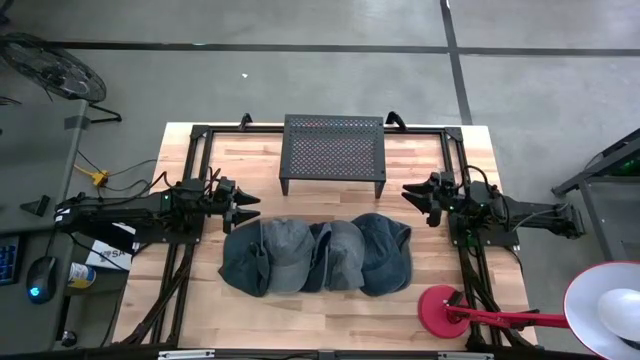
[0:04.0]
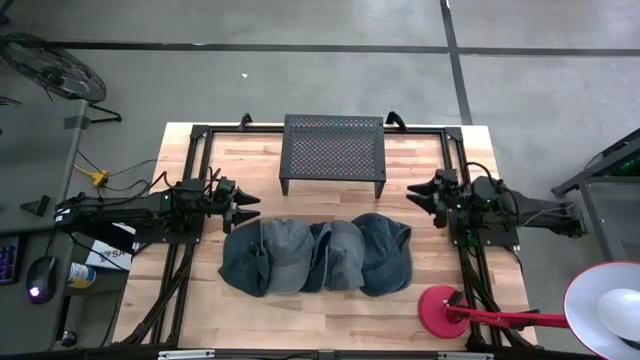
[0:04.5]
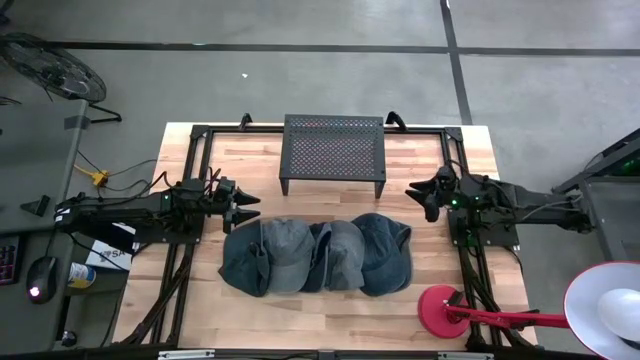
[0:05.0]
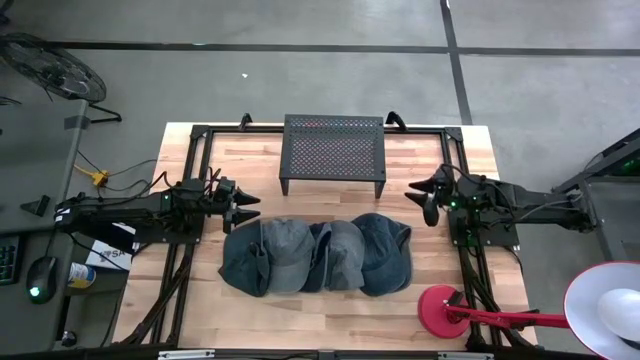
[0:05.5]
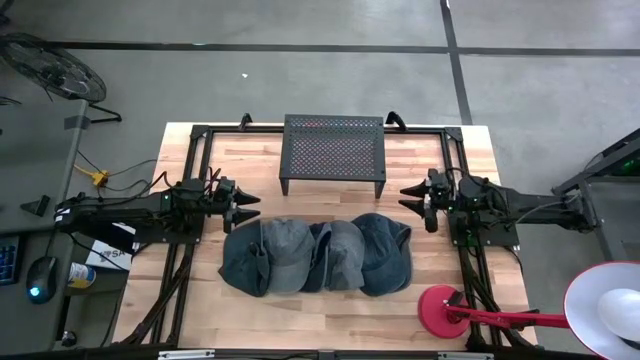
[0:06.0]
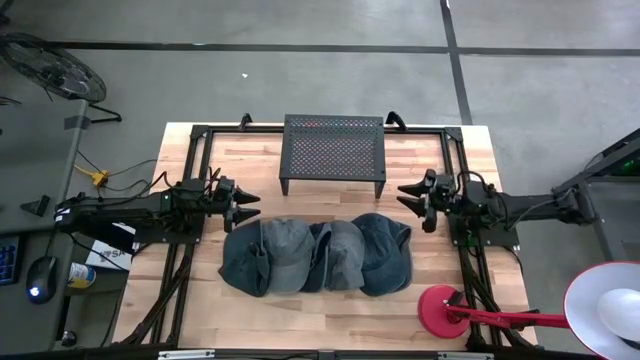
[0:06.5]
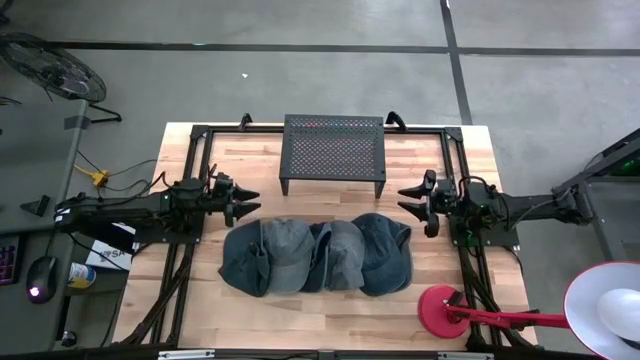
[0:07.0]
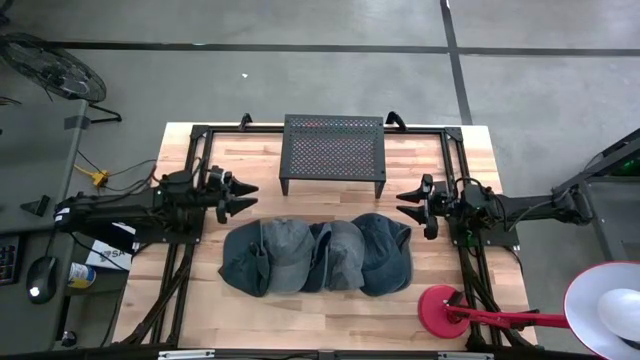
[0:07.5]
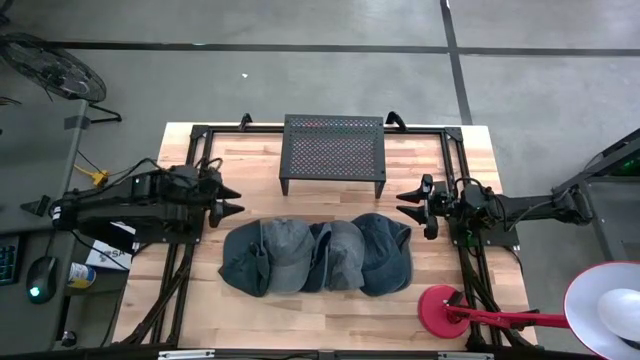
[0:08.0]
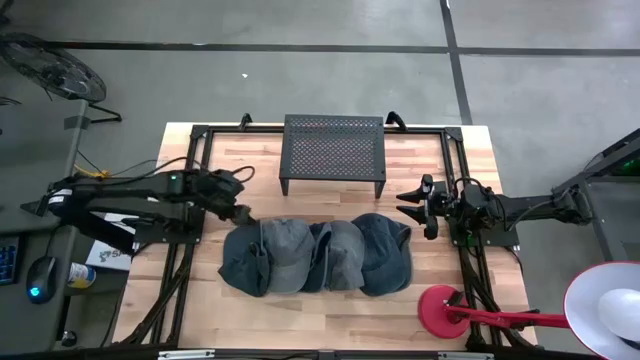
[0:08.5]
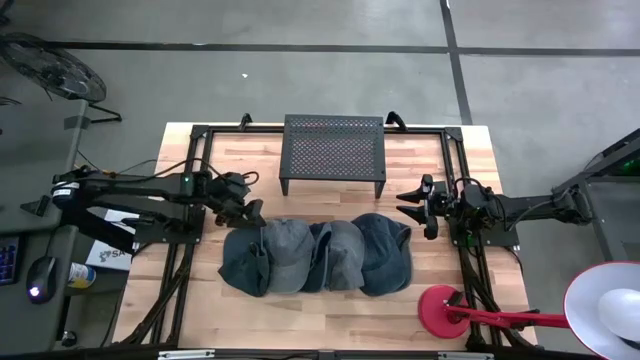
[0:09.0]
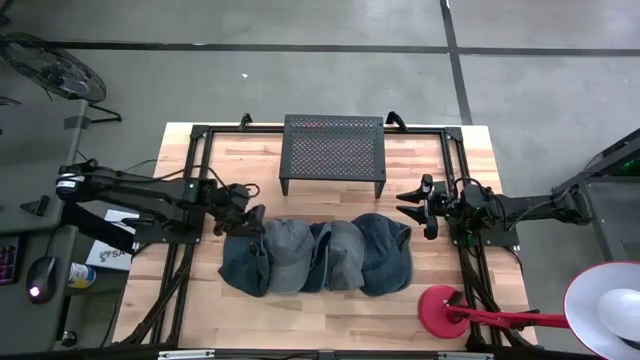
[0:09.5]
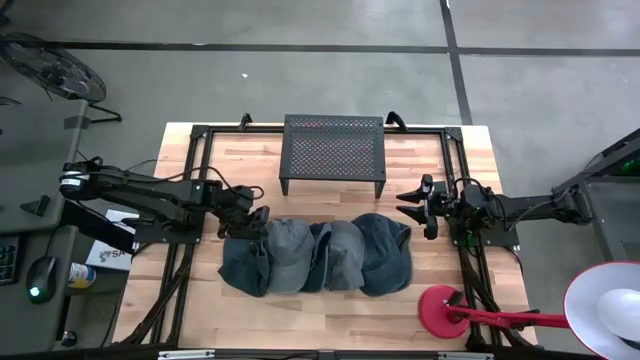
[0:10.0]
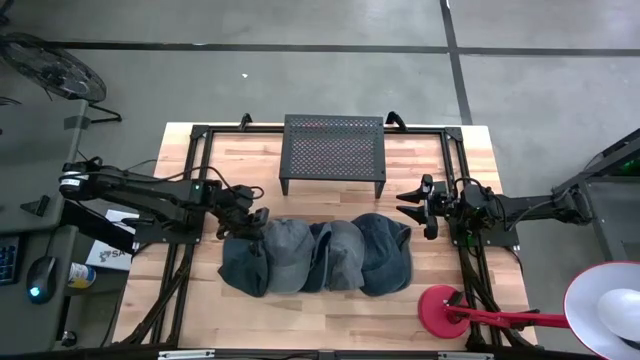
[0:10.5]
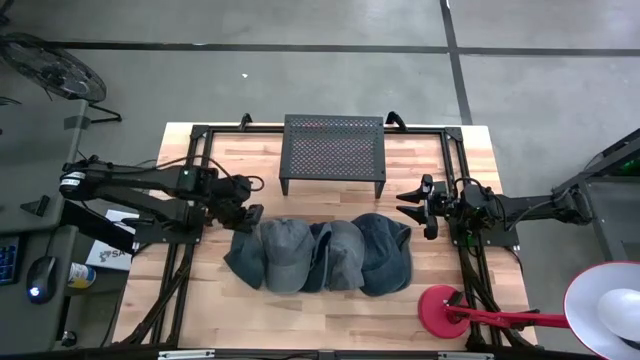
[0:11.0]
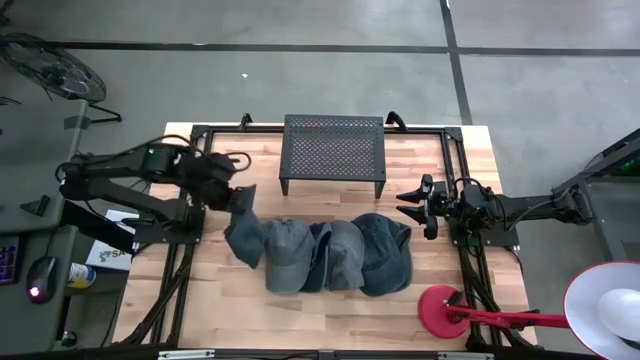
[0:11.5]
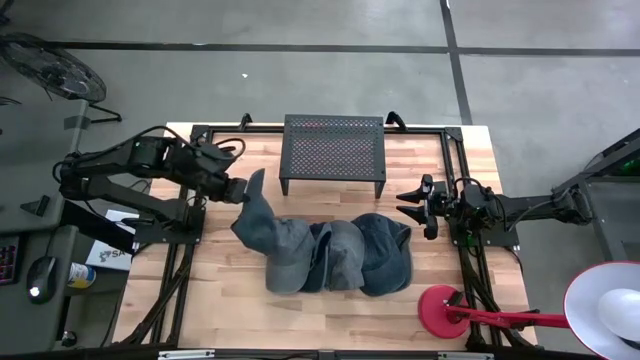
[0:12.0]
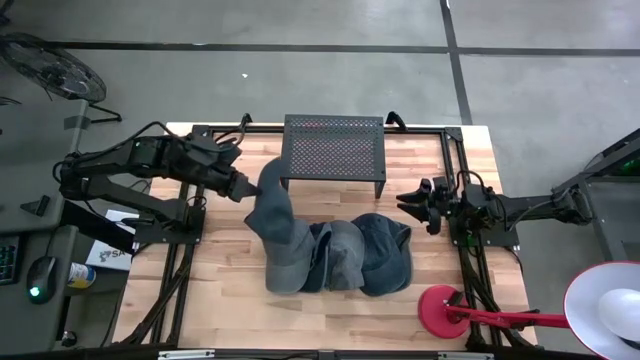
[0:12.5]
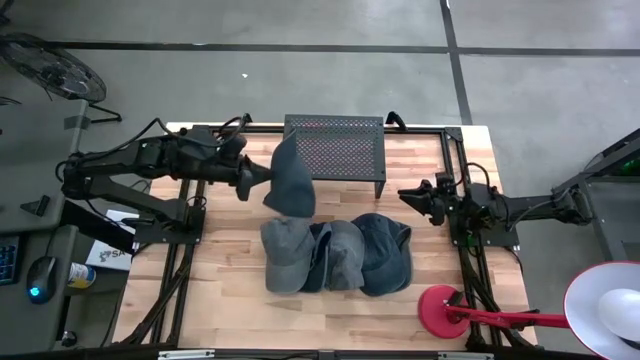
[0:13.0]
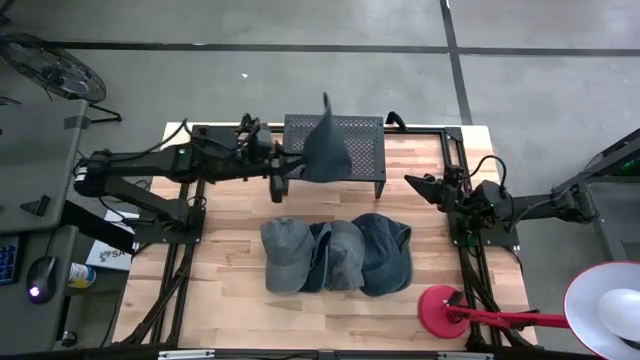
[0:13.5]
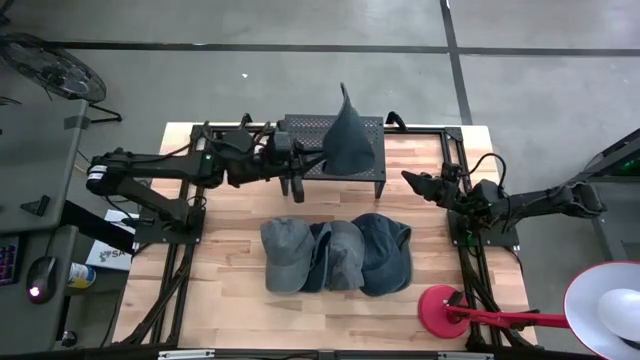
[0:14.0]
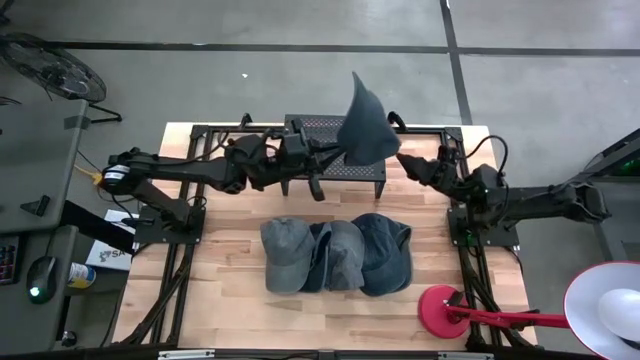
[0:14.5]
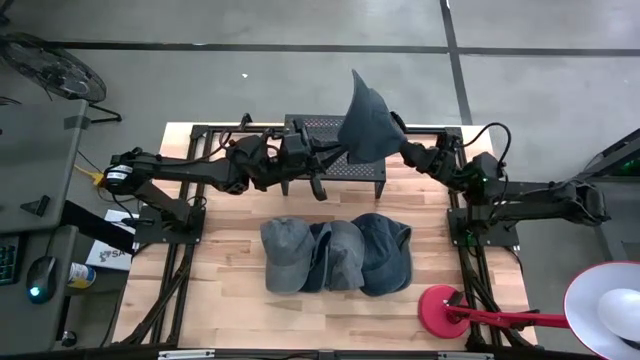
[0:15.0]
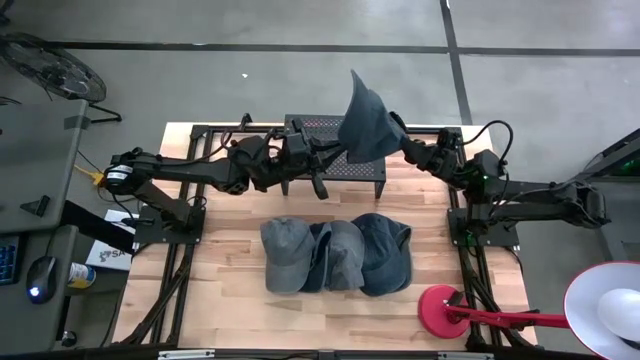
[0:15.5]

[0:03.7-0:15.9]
Task: Pick & Place hat
Put the left blue cap on the shelf

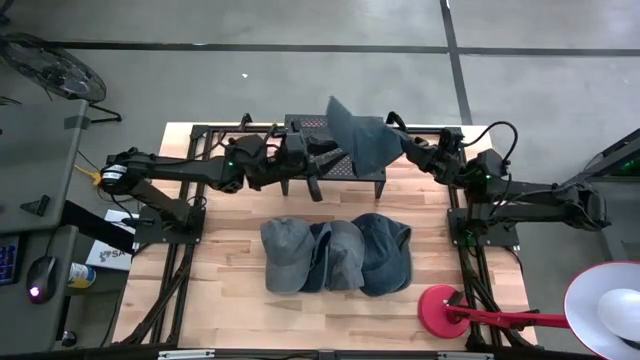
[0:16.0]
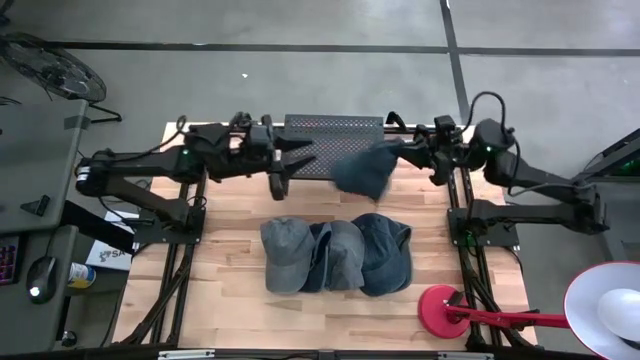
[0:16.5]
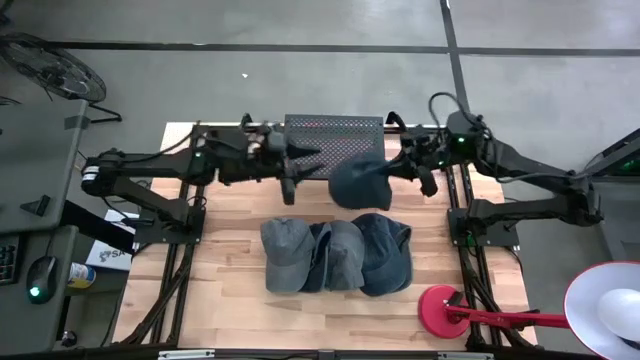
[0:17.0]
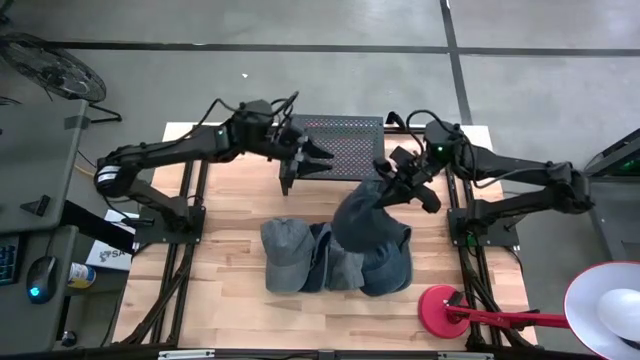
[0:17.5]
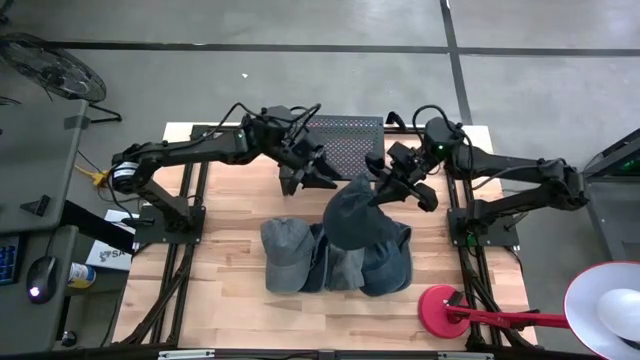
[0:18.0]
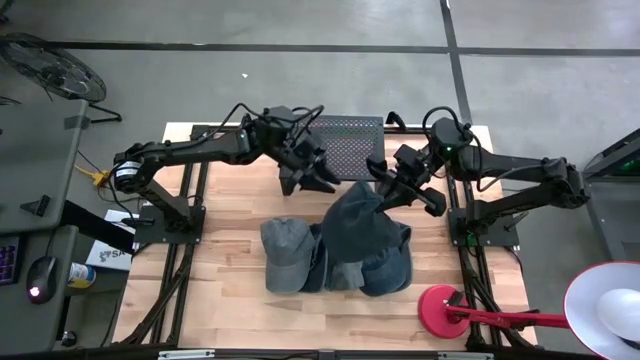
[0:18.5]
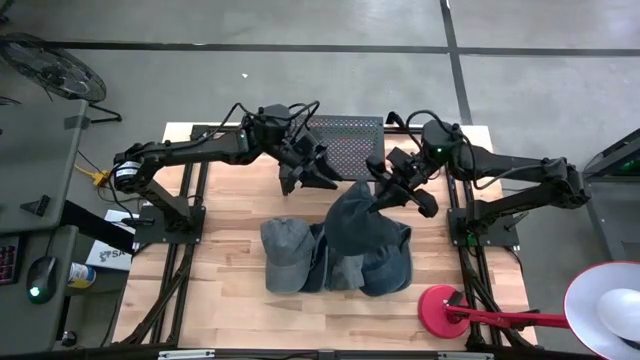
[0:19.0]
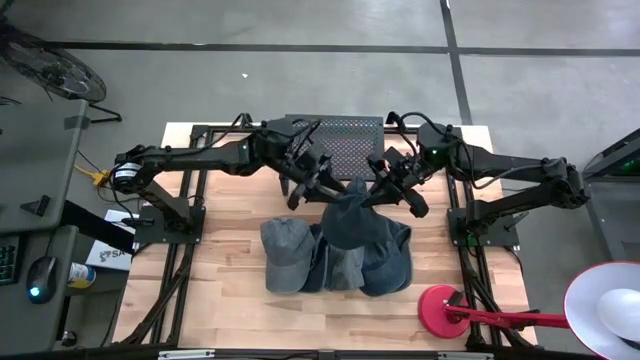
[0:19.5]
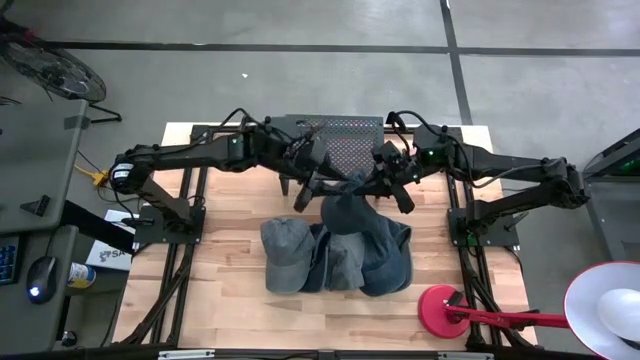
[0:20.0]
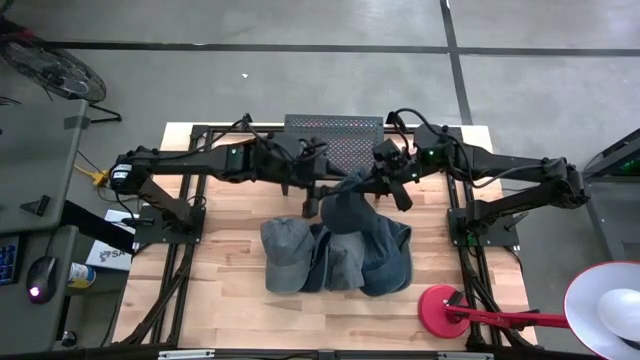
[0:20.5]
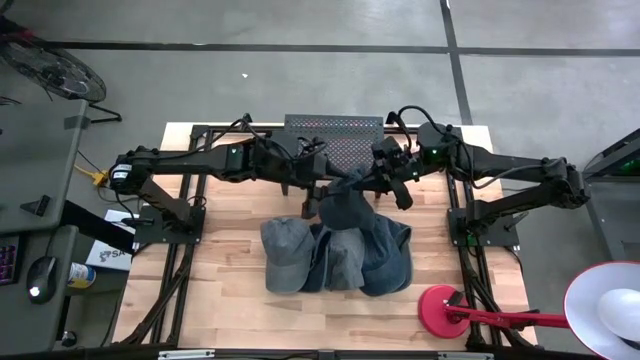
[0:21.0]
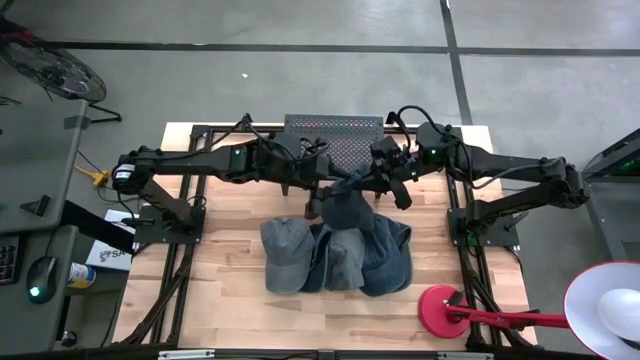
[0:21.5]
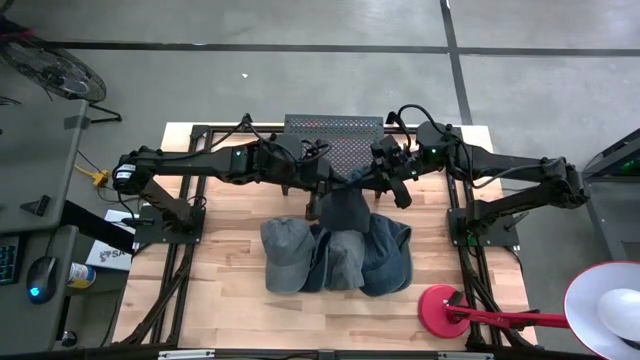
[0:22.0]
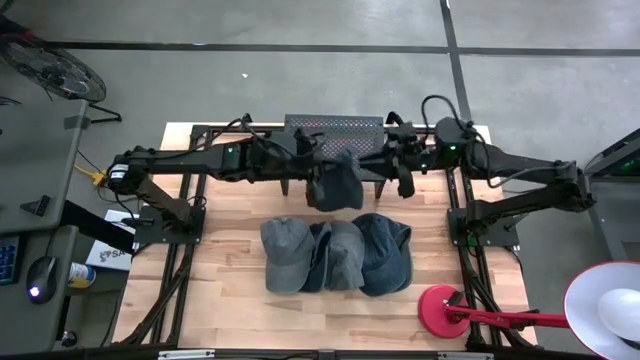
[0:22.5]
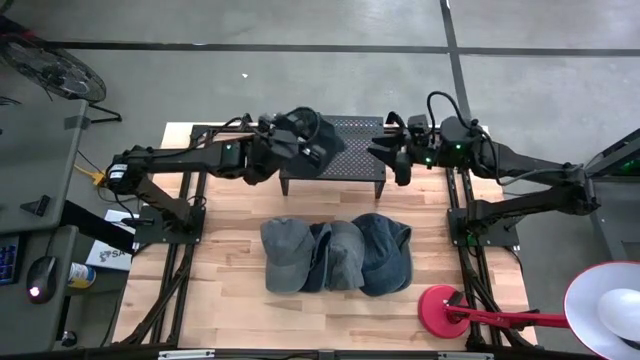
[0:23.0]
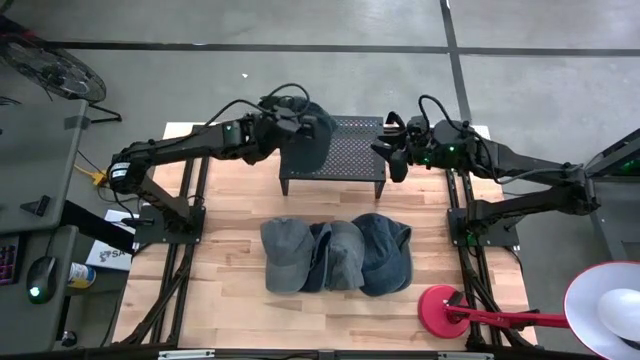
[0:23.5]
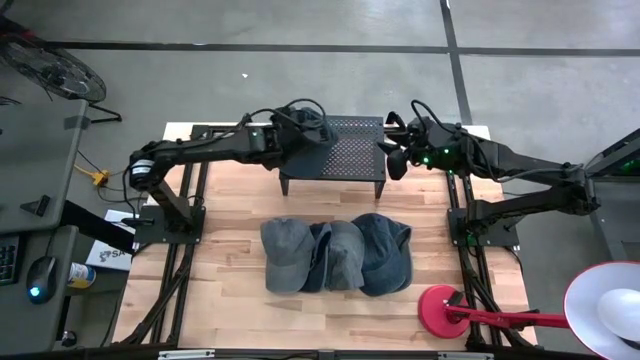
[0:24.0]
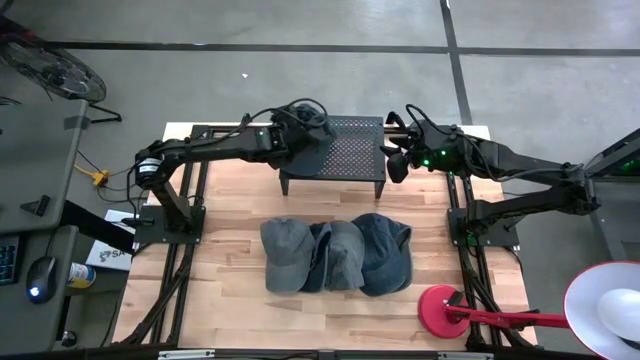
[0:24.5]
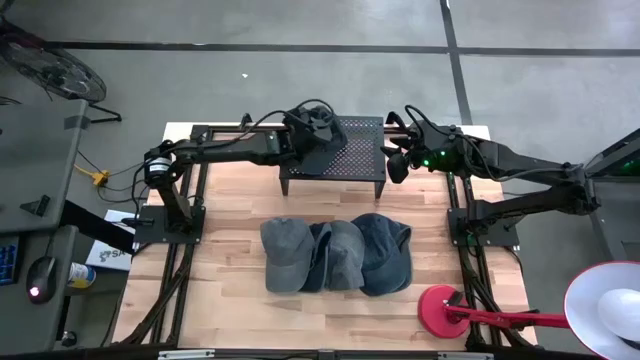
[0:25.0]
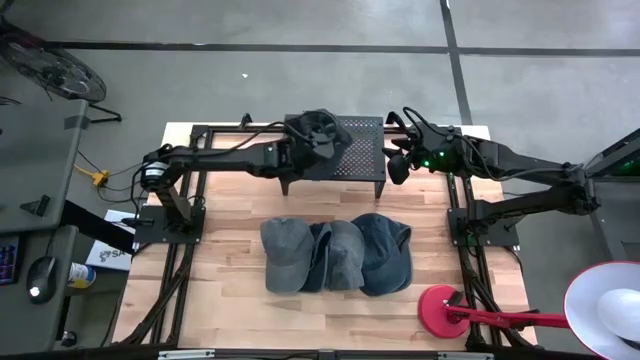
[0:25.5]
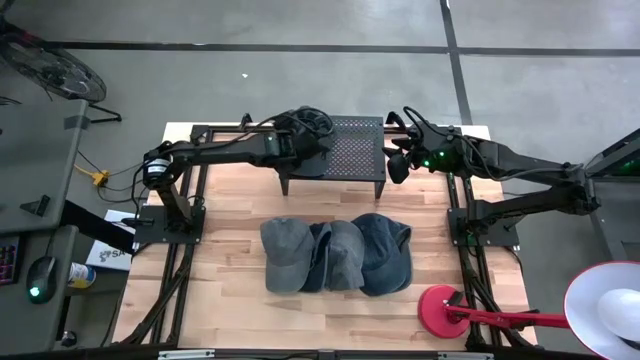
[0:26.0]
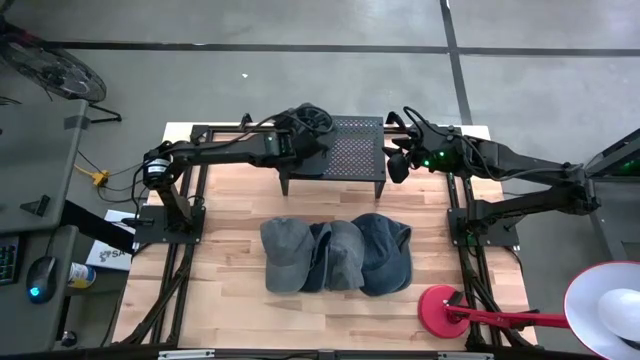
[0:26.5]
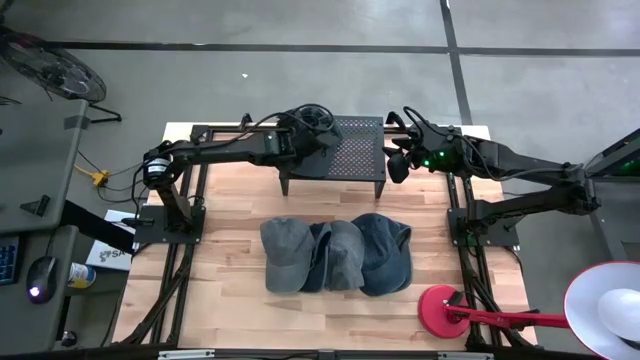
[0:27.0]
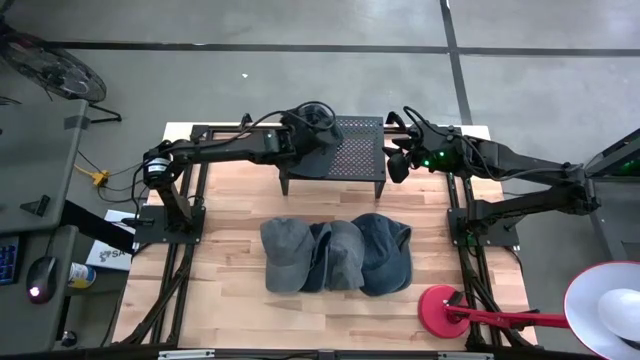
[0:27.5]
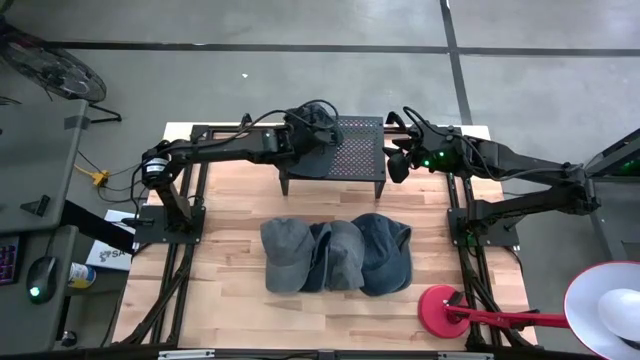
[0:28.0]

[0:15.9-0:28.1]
Put the left blue cap on the shelf
